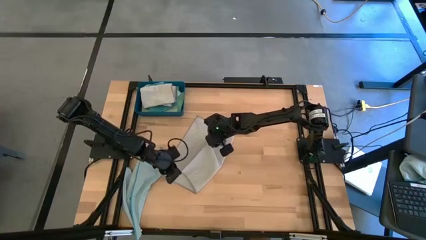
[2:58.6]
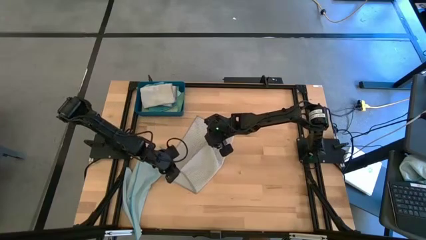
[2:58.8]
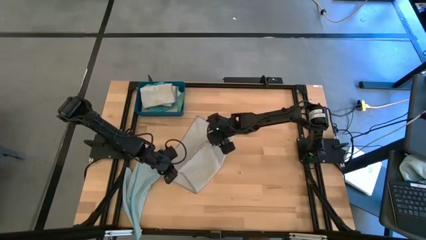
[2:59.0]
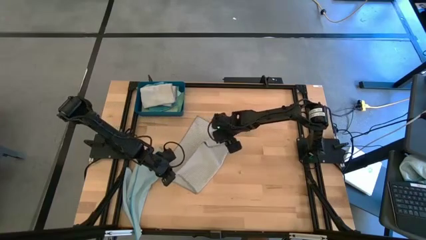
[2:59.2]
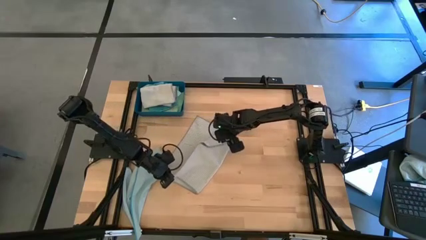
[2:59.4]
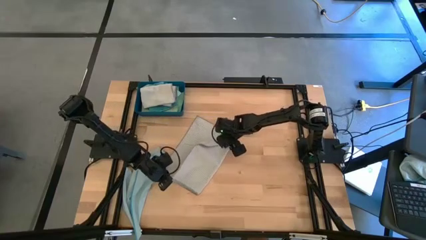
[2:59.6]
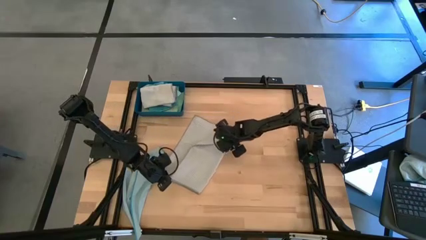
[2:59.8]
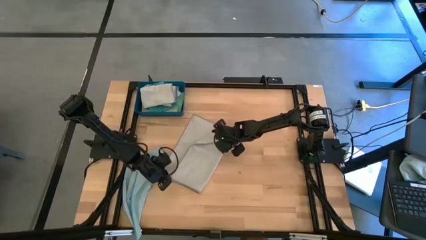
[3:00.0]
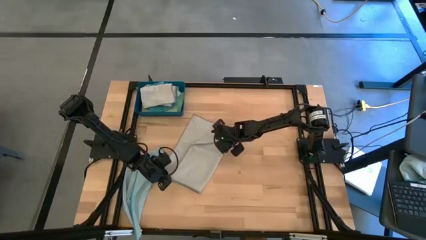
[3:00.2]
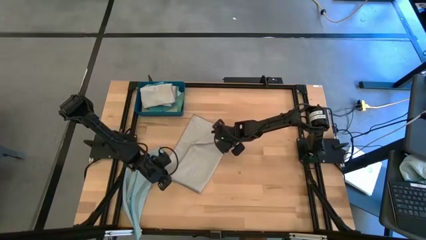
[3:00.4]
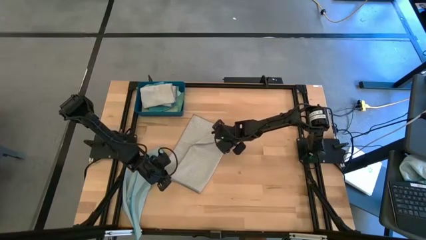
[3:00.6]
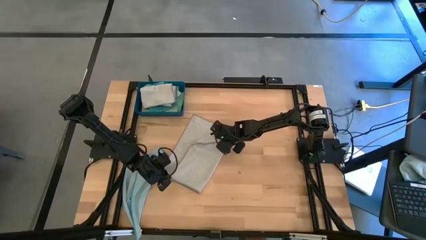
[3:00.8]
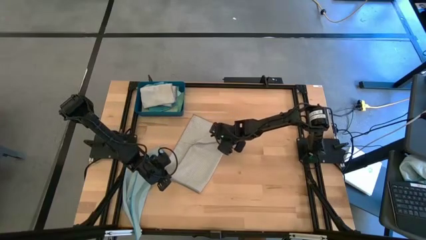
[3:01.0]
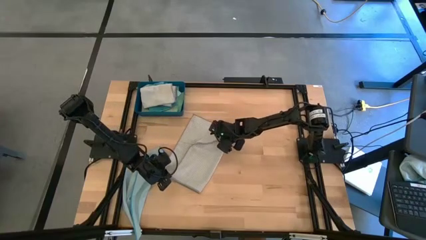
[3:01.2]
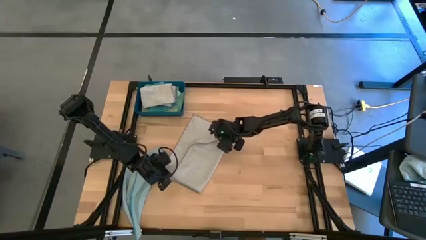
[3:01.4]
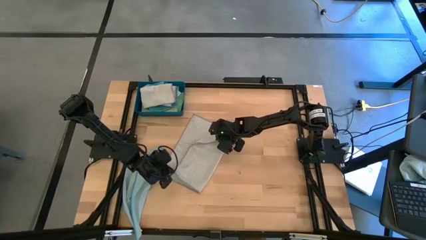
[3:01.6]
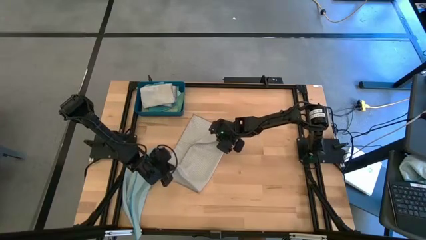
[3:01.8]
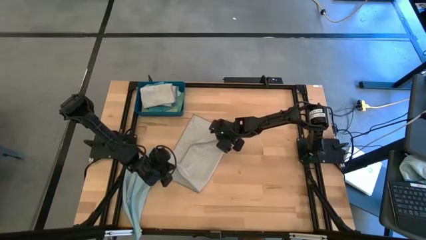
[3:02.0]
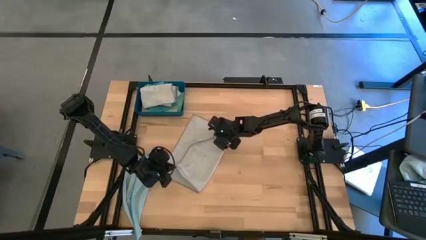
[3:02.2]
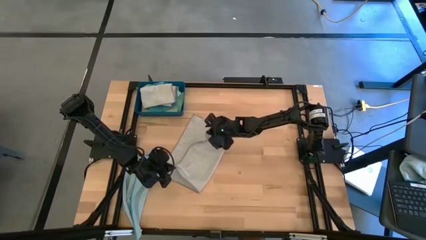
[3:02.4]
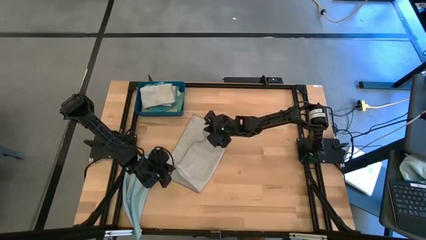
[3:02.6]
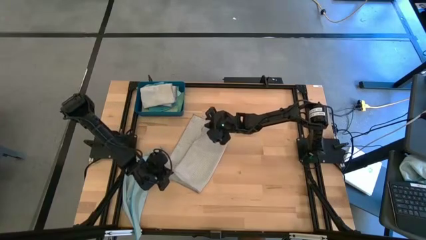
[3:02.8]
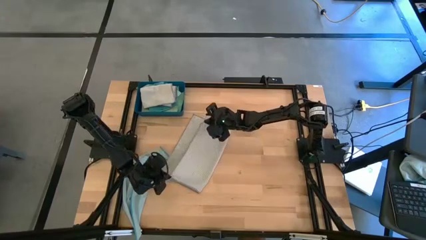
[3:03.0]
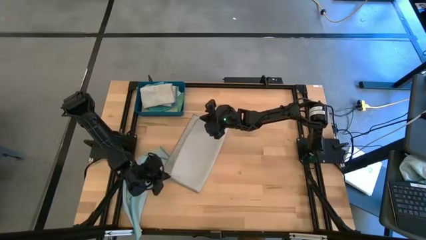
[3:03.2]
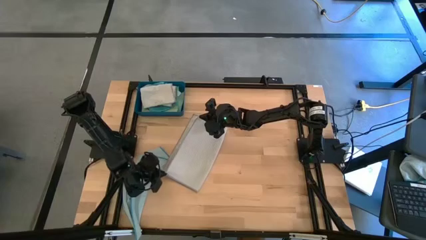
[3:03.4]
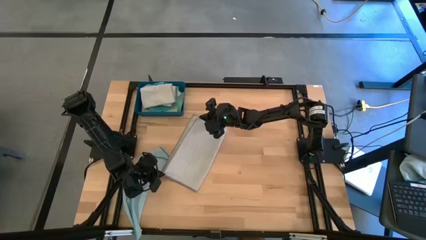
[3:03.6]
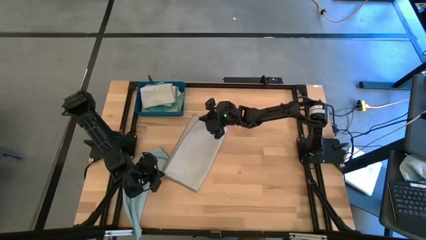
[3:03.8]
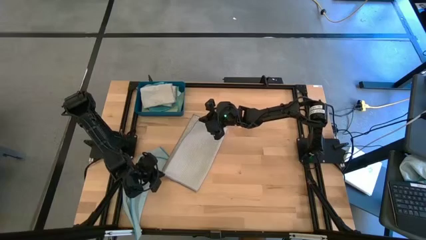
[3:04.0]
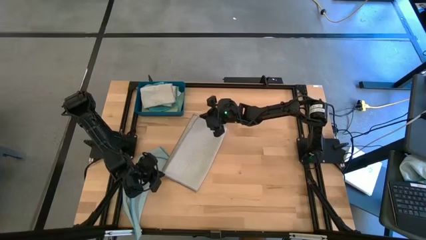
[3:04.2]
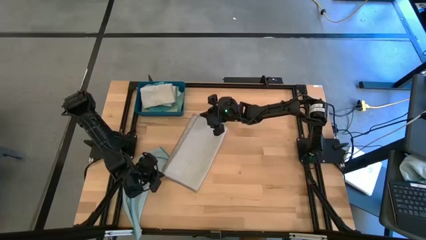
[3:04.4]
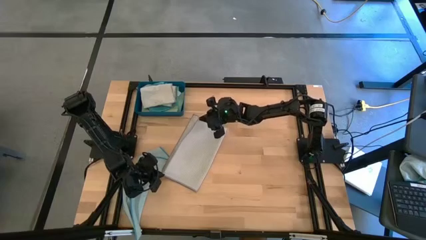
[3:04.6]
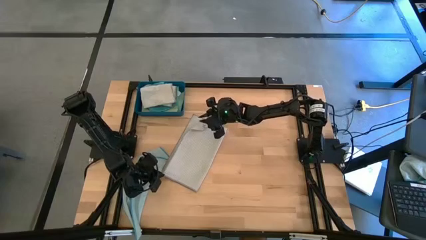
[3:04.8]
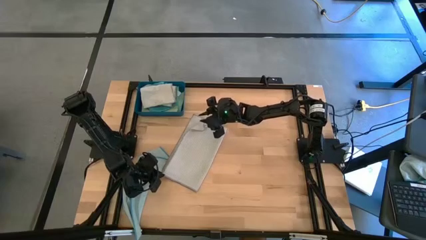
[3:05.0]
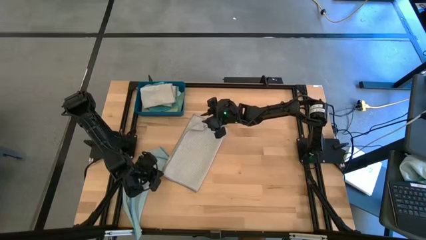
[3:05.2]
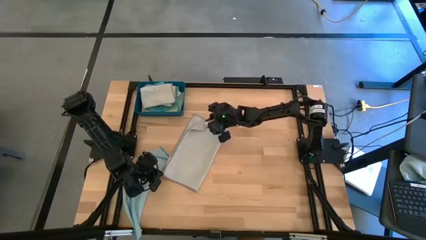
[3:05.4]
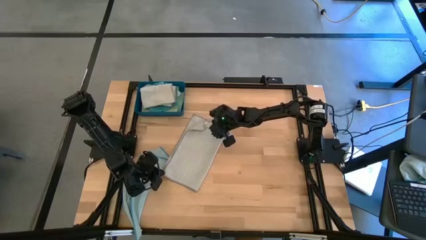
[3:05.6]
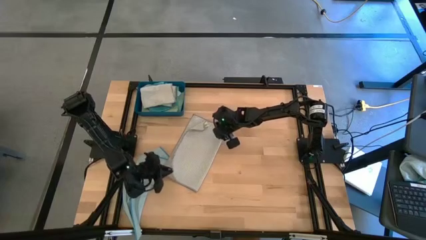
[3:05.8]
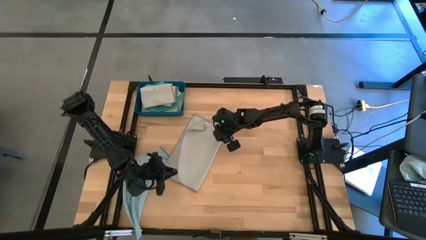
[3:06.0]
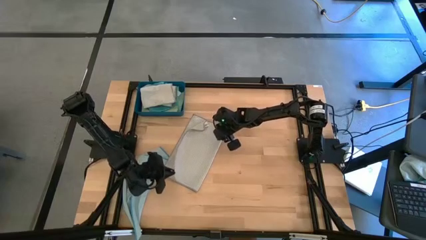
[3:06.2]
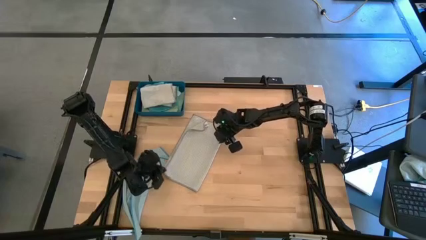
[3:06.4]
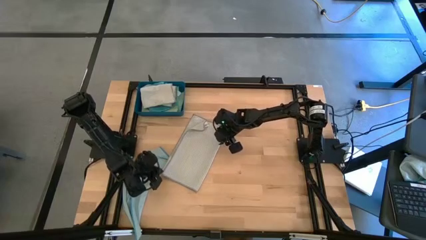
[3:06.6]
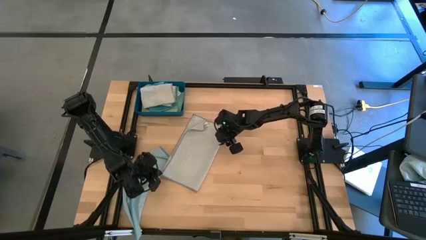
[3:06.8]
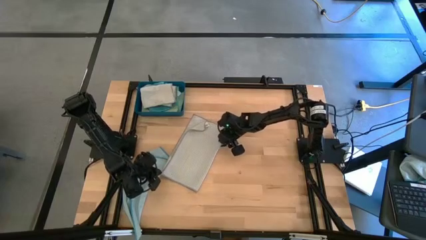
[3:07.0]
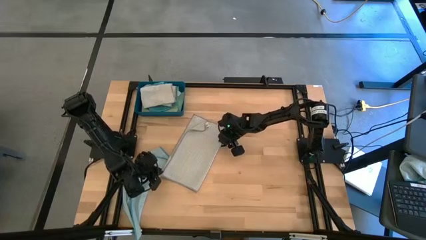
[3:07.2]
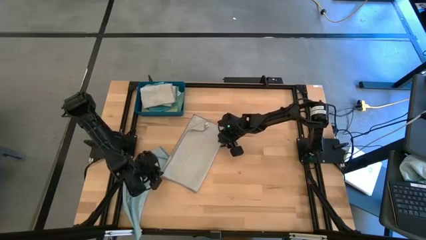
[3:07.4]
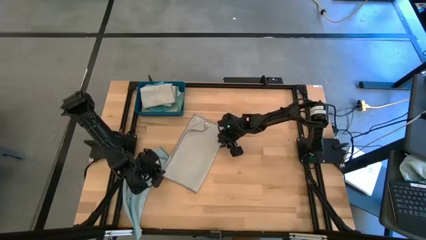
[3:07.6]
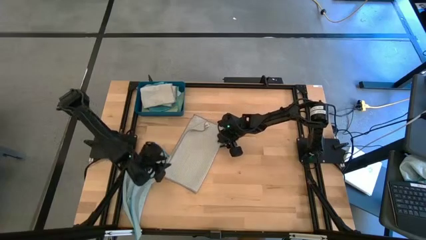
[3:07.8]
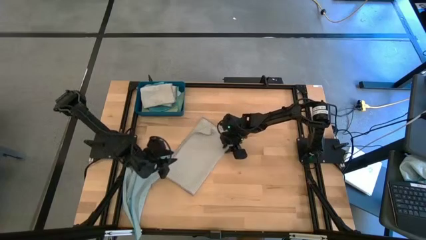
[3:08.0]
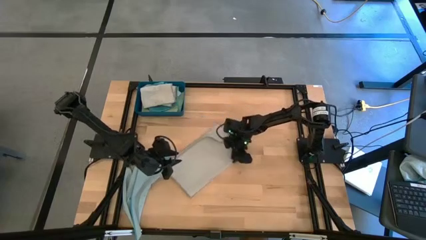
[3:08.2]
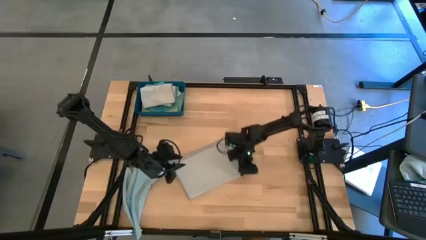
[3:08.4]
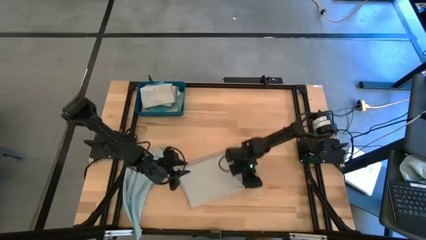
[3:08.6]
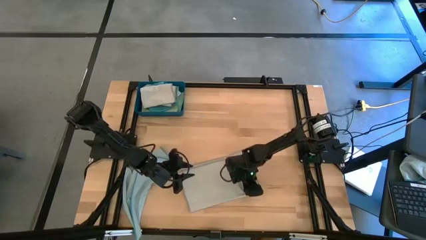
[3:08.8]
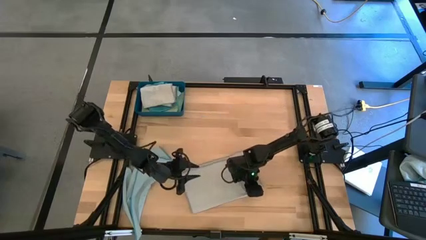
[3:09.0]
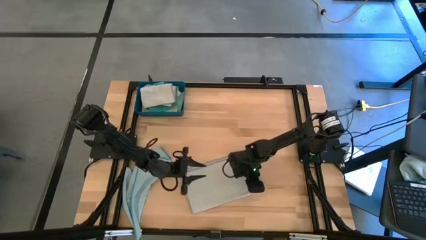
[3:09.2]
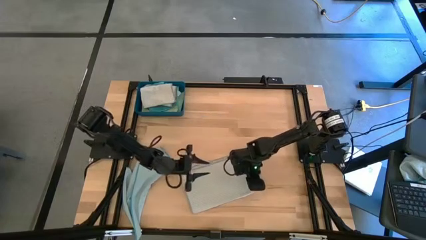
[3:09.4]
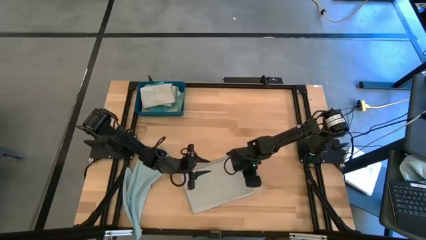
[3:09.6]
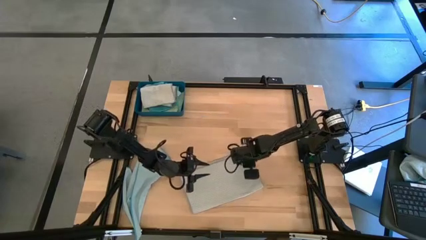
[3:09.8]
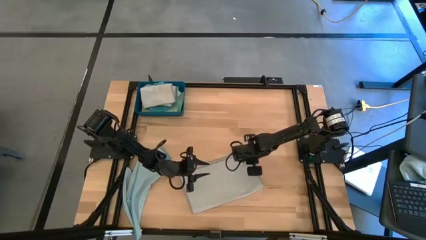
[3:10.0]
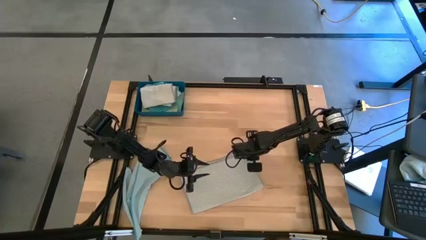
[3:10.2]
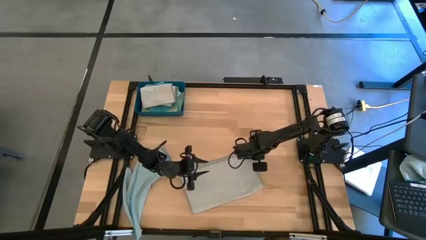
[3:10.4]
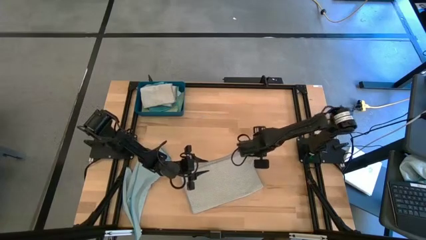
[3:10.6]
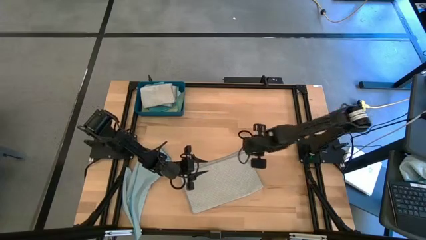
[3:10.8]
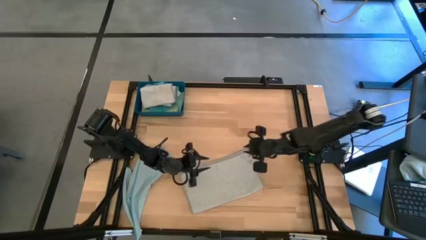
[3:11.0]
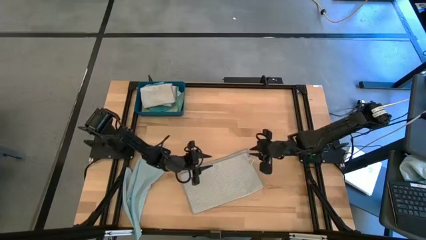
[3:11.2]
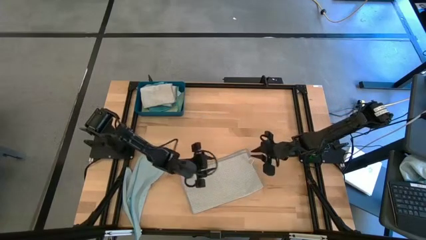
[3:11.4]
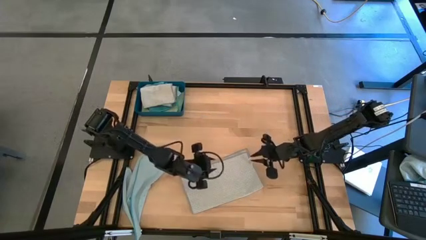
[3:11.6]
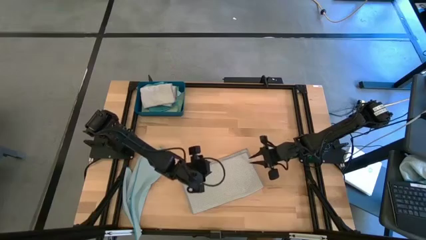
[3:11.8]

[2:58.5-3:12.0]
Task: Fold microfiber towels
Fold the gray towel
